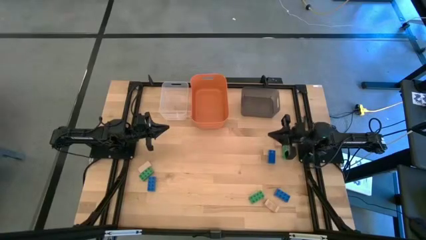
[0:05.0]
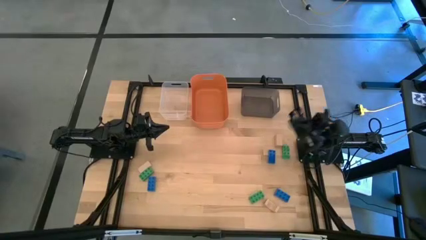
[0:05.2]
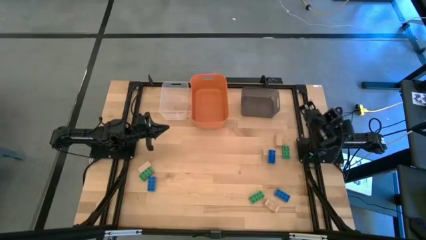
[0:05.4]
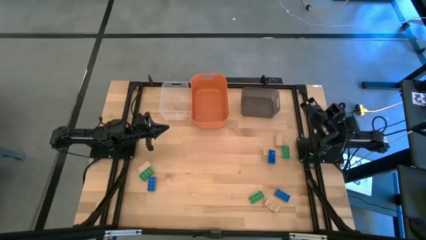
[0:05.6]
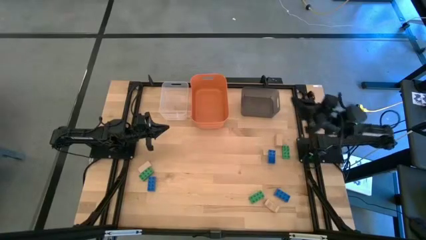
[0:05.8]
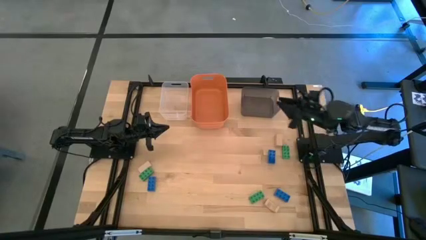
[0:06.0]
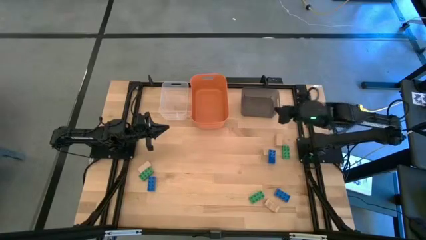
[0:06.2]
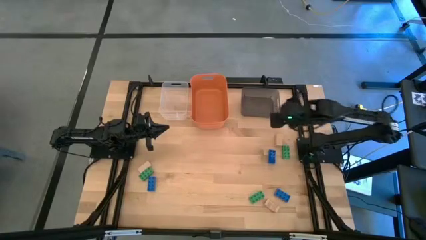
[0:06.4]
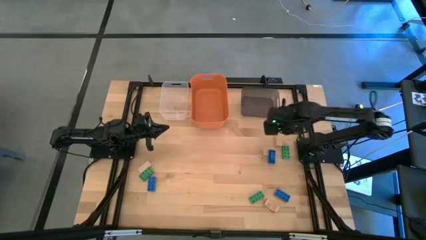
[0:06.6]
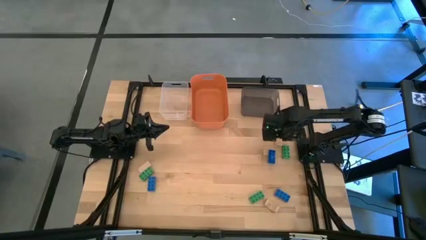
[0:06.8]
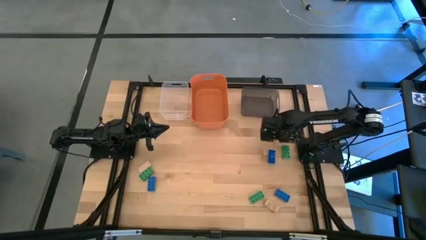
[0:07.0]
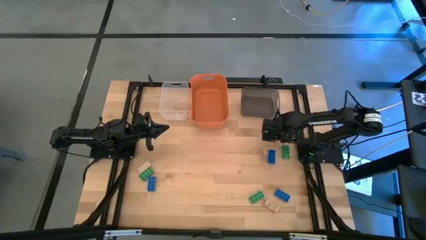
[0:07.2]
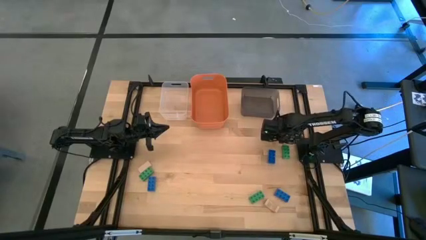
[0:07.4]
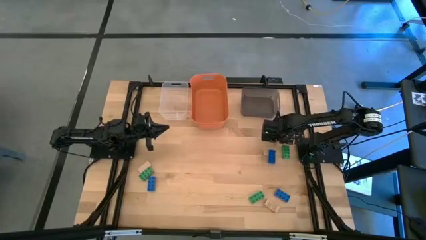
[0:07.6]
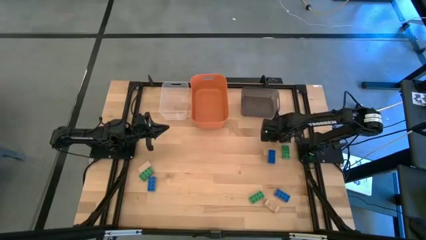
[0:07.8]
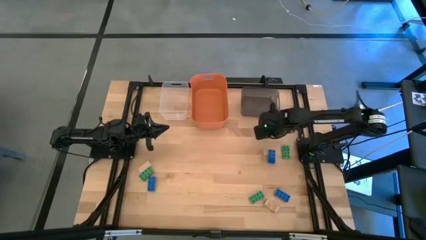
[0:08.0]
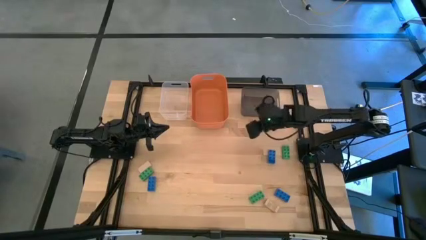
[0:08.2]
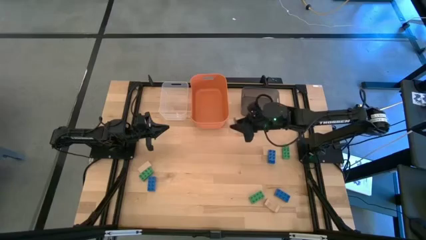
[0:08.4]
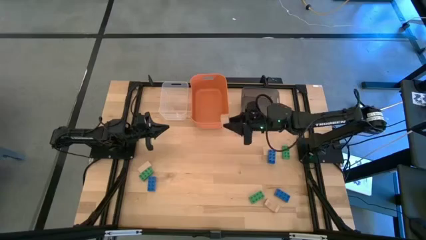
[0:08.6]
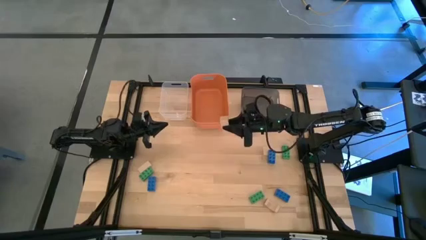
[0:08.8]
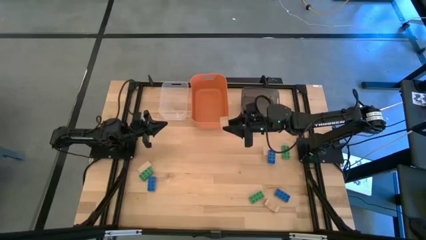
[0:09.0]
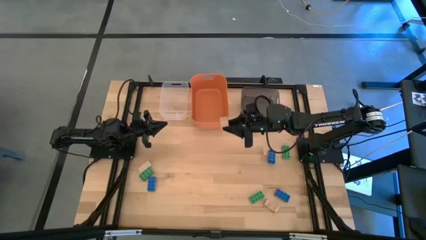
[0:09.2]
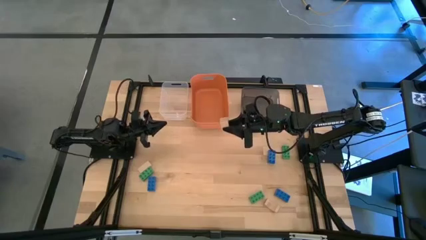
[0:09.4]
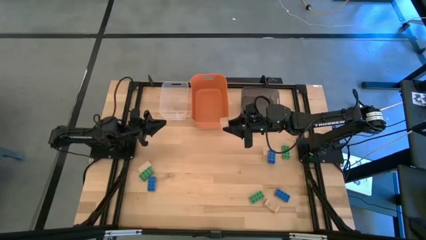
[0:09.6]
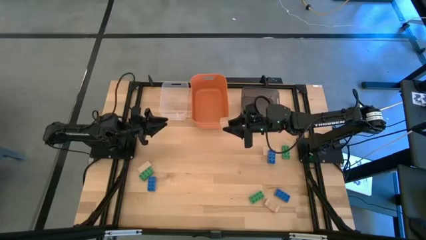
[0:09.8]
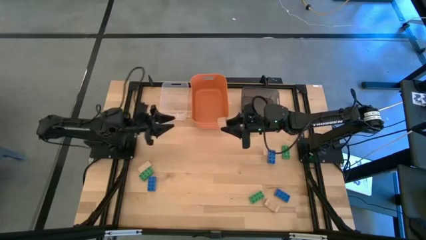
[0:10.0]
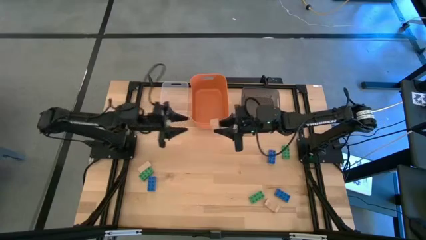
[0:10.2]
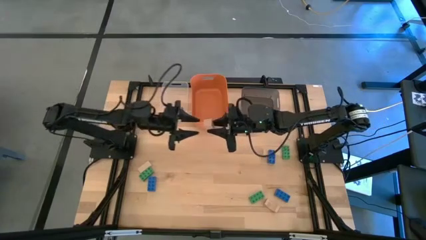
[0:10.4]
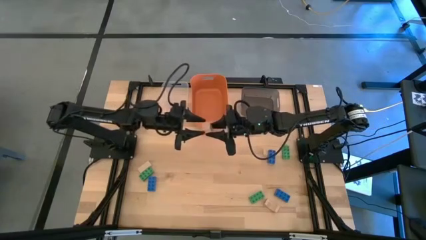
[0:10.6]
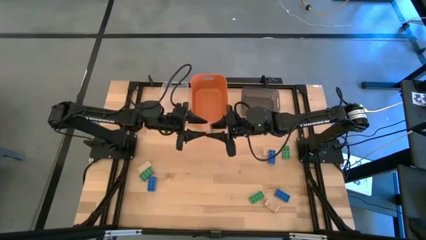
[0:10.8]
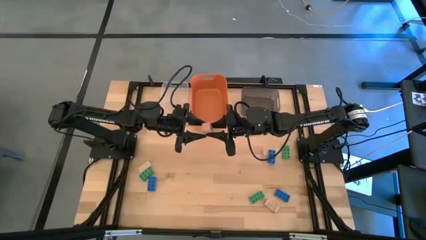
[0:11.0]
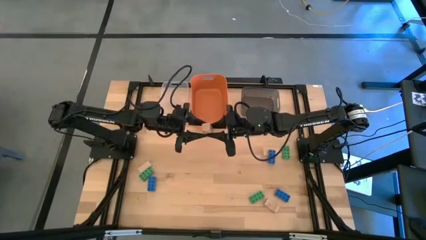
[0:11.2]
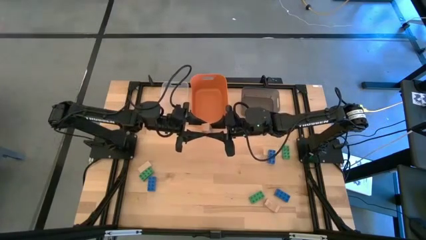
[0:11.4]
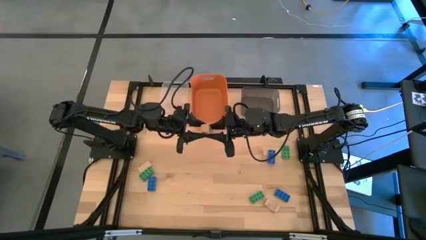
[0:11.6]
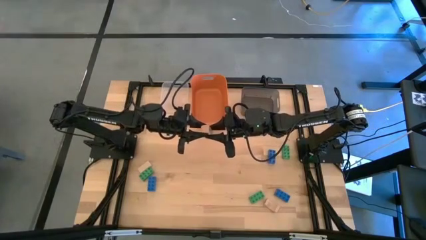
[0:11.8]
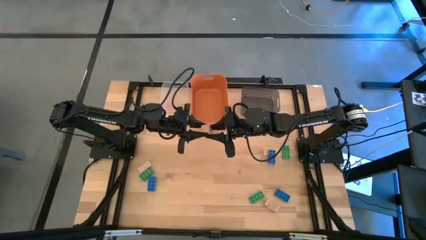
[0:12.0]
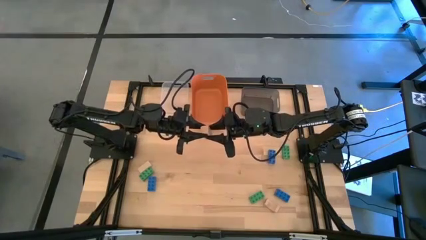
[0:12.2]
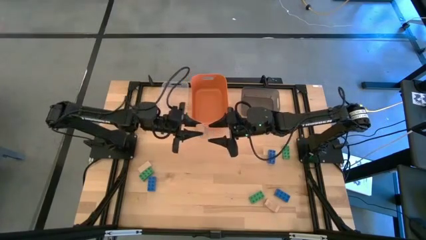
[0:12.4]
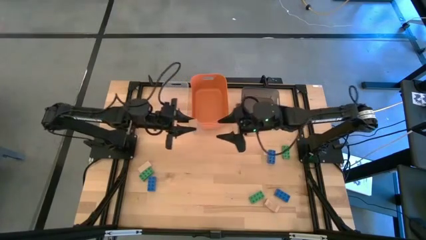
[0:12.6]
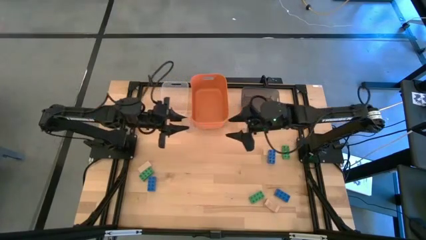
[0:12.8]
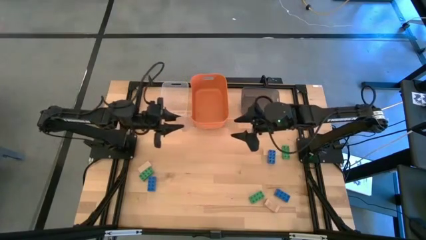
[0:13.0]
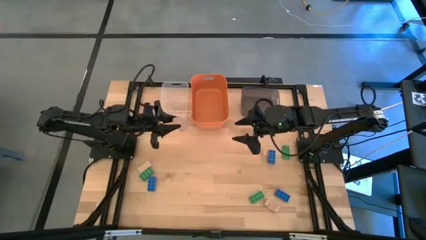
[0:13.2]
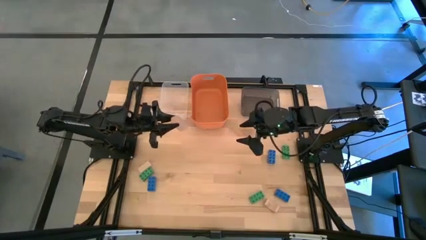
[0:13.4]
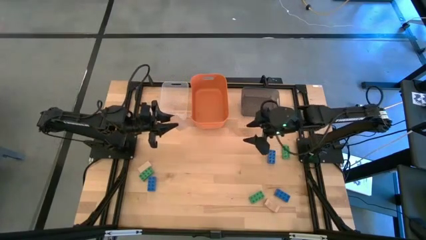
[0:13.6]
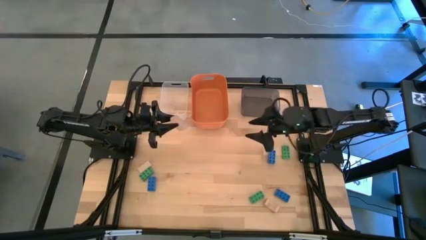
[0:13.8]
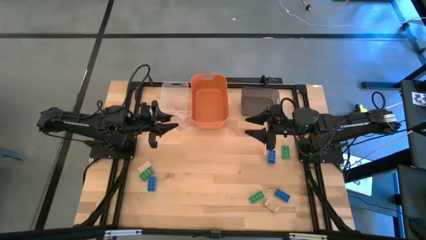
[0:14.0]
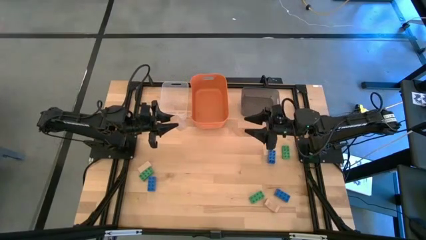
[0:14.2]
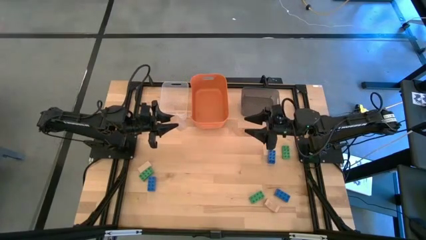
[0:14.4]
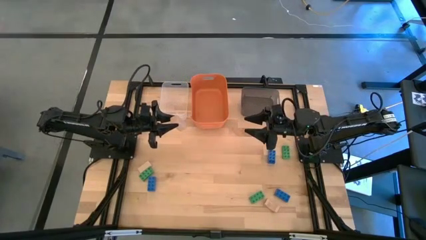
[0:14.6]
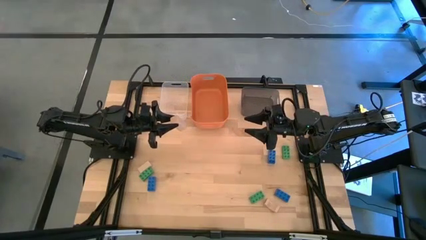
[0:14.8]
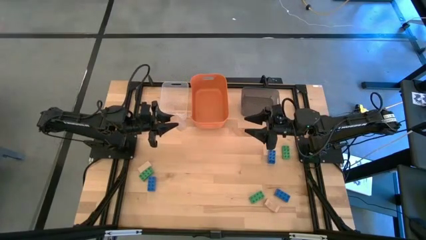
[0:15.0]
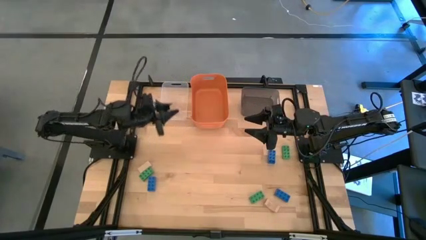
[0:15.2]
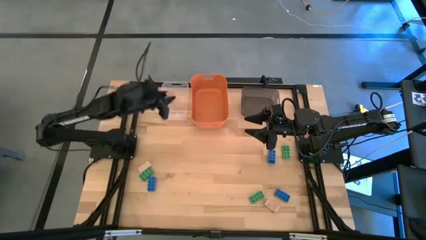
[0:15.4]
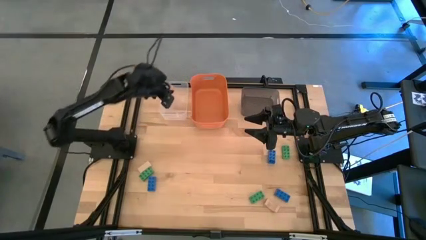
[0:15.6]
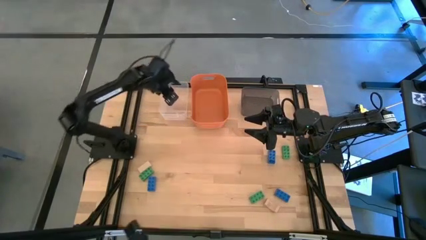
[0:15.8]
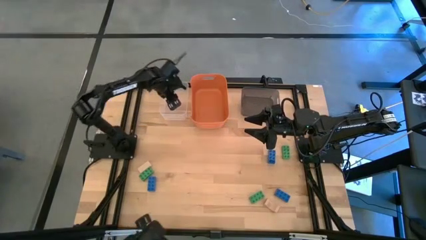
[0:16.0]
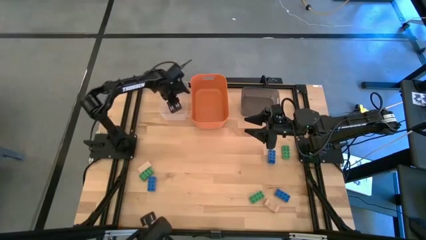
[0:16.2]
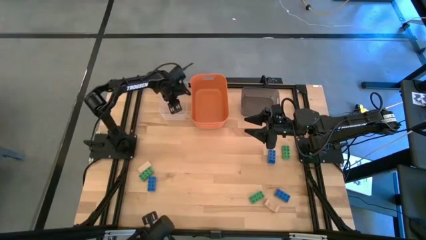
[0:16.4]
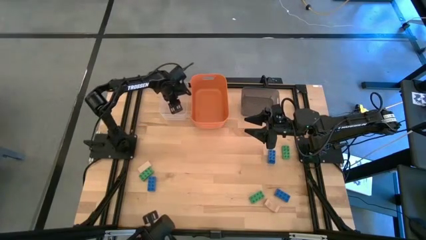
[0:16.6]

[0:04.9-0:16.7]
Task: Sort & place blocks by color
Put the top right brown block into the transparent bin

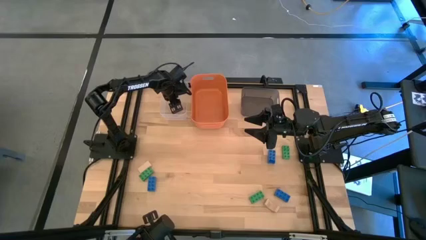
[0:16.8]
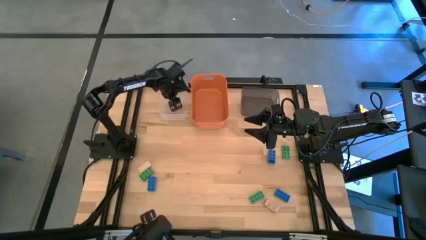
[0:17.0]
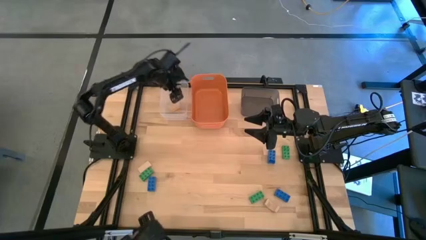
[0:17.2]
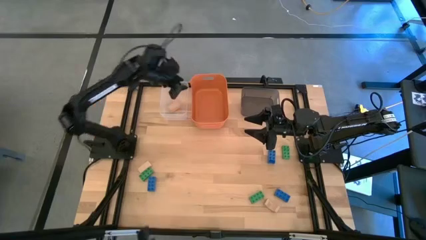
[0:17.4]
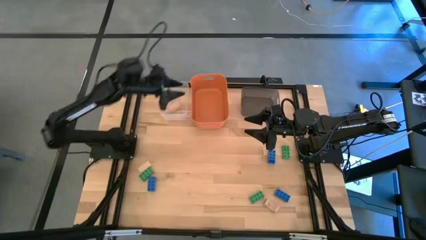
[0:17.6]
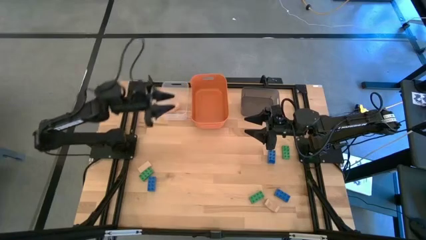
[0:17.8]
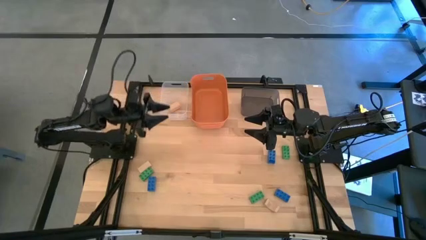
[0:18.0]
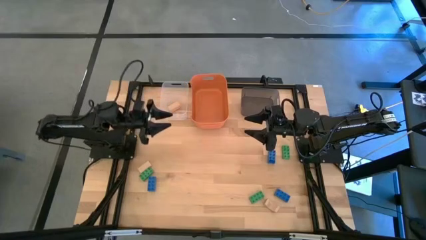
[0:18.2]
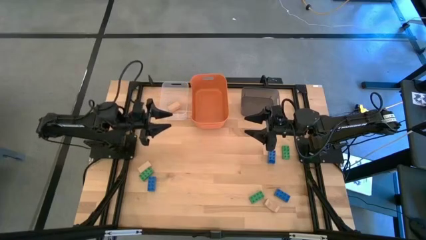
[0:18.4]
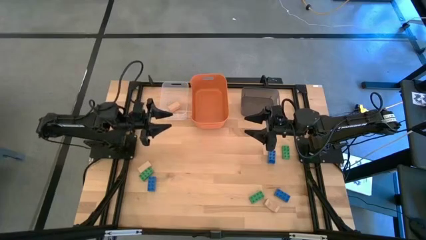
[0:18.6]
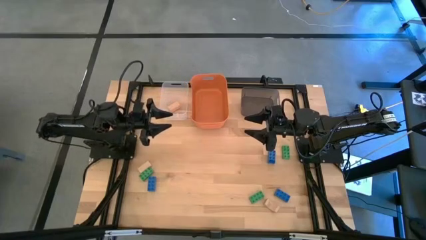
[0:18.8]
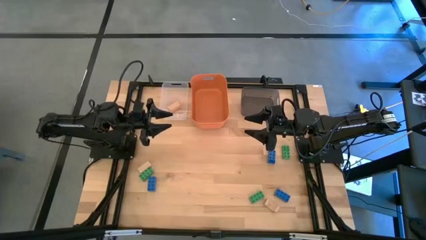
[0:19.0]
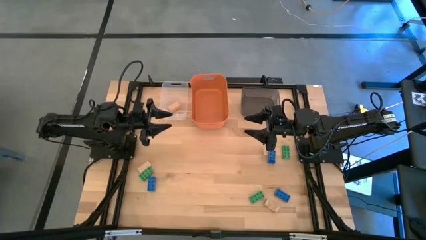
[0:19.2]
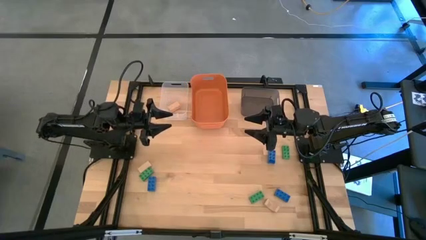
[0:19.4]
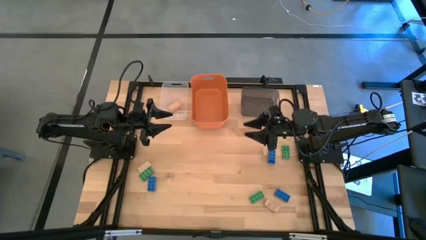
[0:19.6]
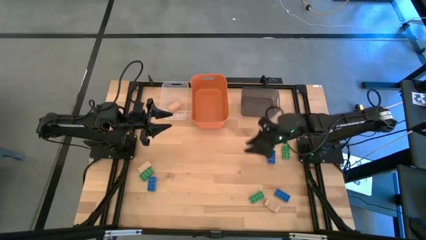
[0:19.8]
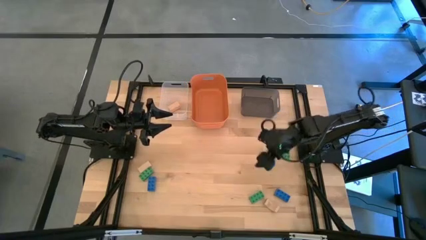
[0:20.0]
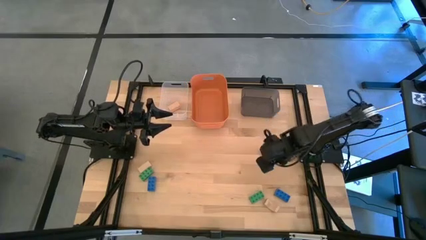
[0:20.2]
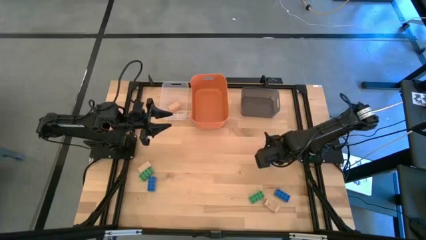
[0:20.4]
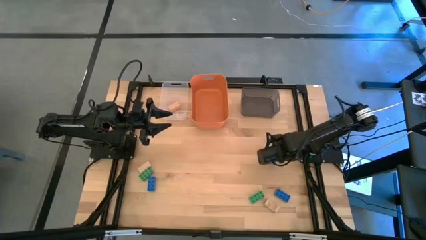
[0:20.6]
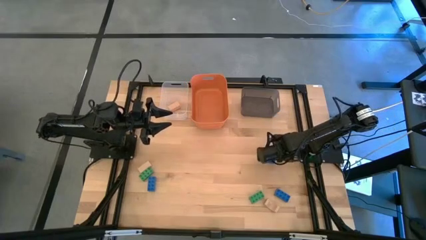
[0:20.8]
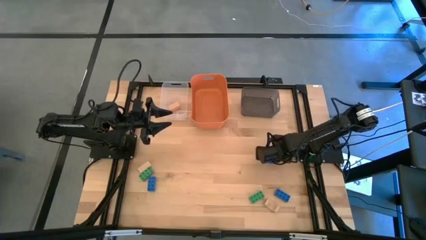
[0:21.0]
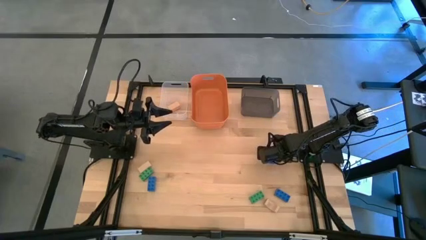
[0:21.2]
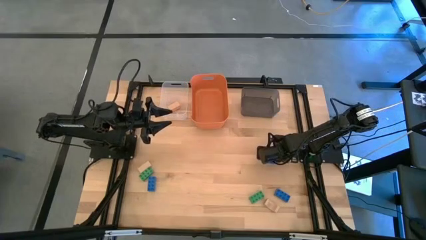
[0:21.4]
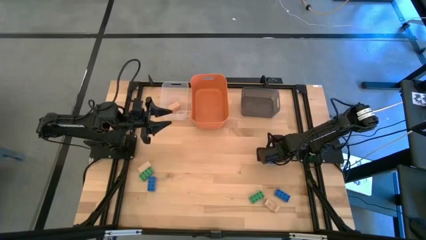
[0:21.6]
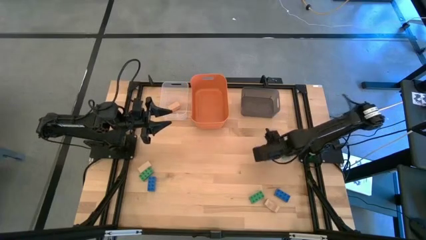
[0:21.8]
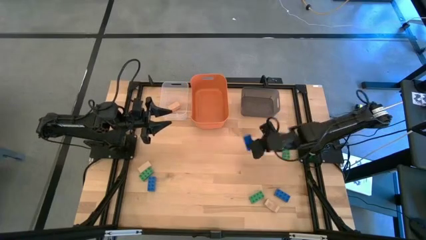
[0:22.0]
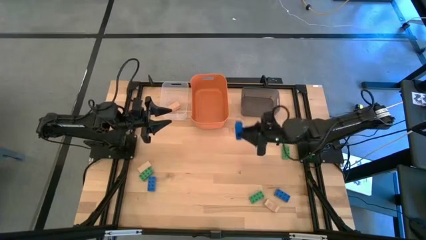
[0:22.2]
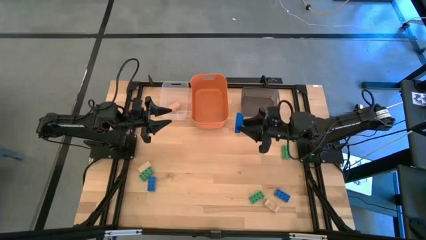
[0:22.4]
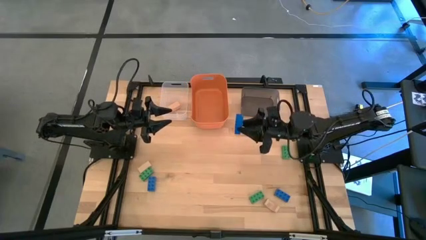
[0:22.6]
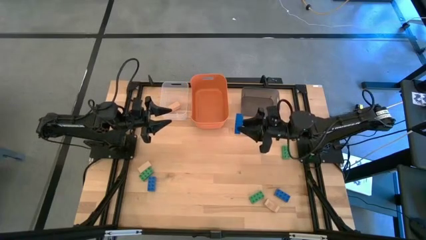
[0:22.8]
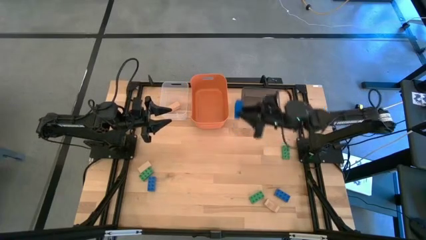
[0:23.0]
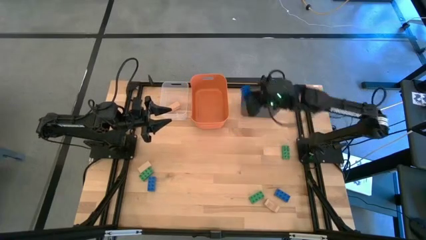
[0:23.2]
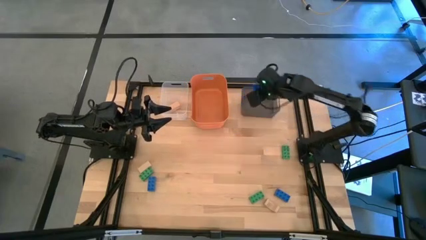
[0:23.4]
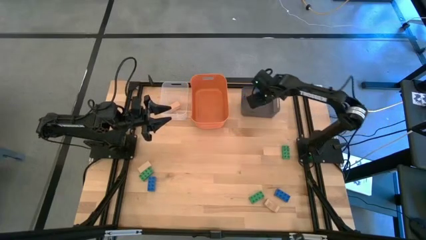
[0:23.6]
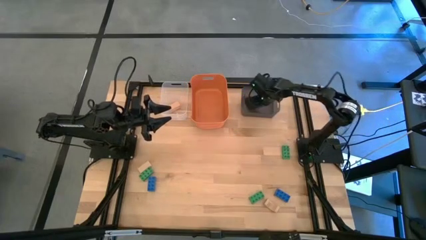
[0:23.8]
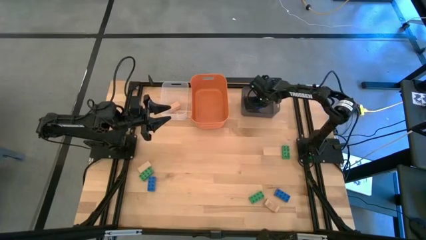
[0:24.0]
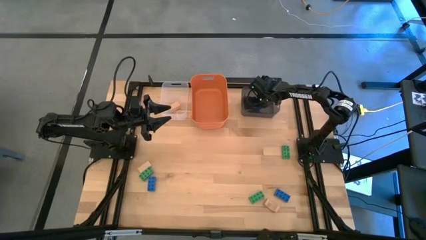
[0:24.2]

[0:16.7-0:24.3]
Put the top right blue game piece into the black bin
